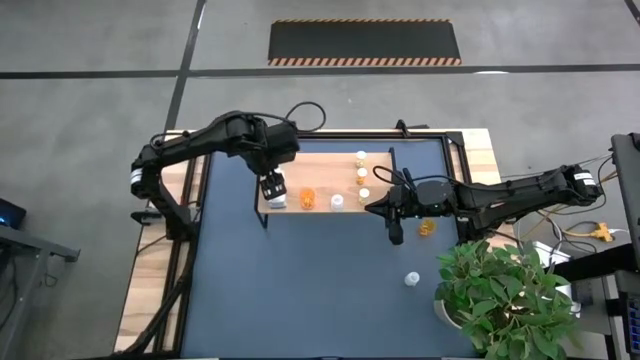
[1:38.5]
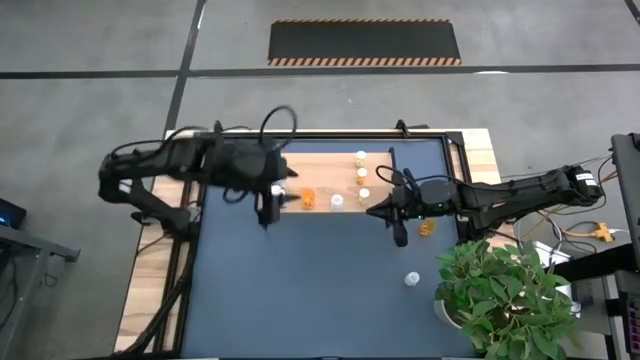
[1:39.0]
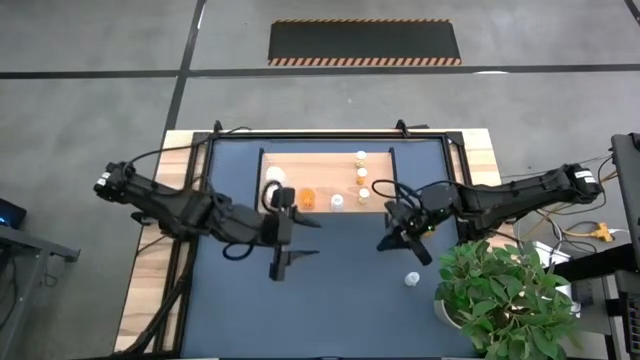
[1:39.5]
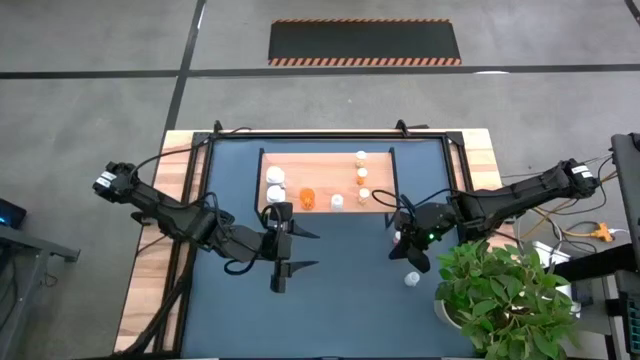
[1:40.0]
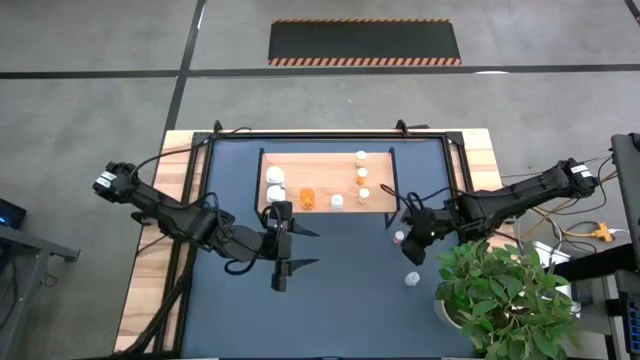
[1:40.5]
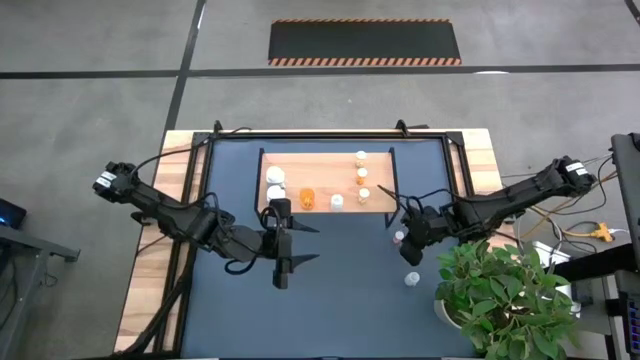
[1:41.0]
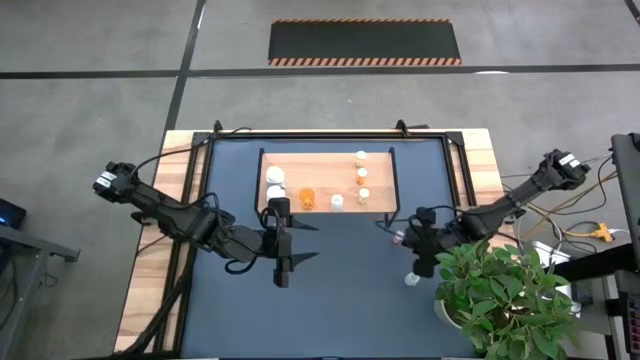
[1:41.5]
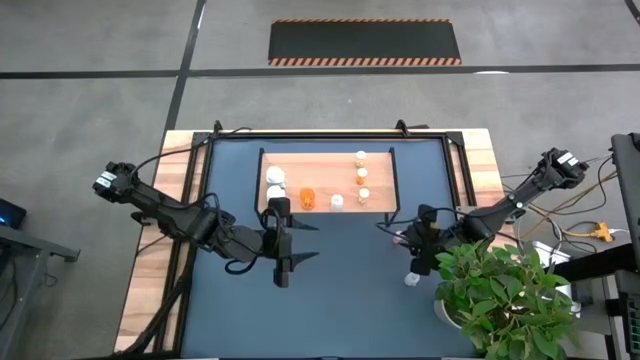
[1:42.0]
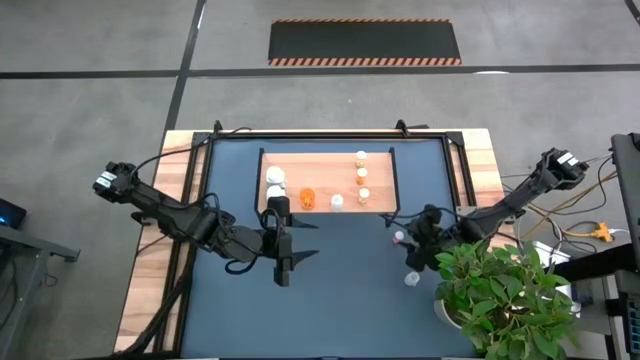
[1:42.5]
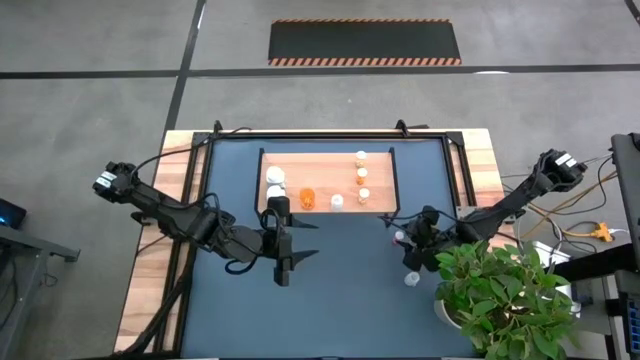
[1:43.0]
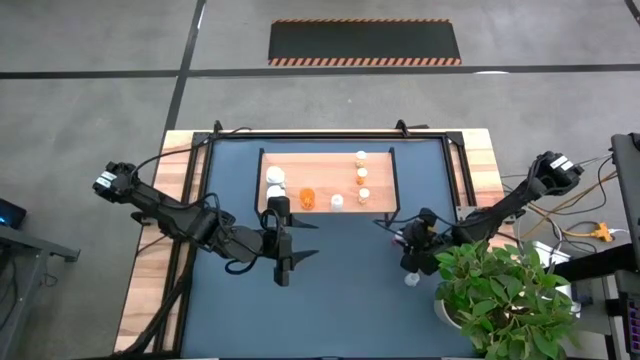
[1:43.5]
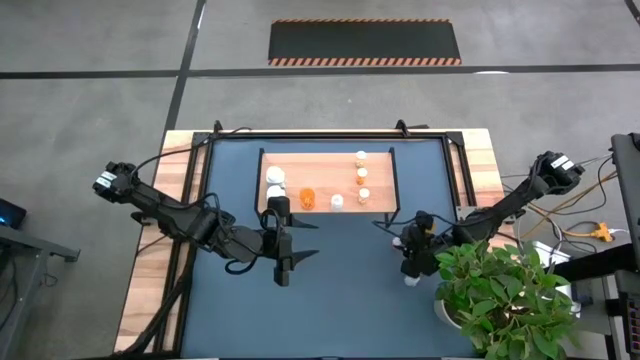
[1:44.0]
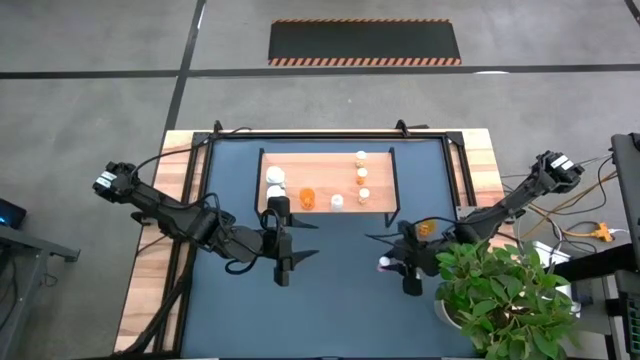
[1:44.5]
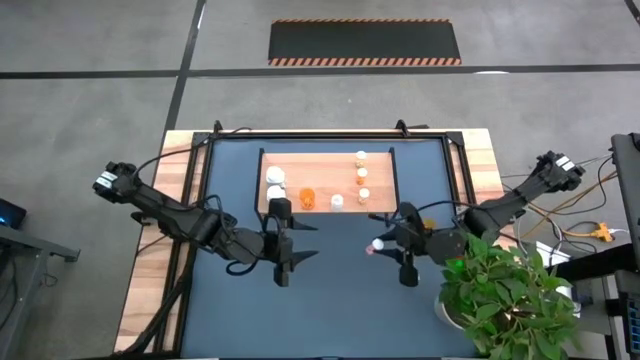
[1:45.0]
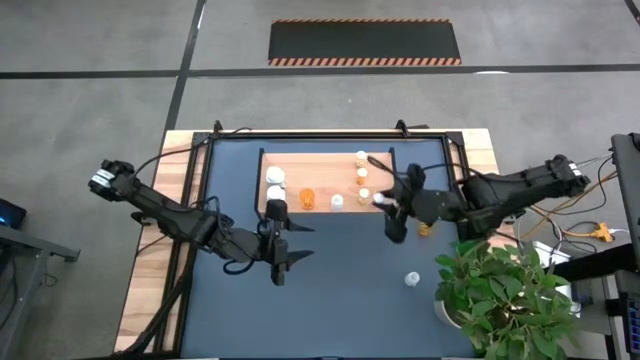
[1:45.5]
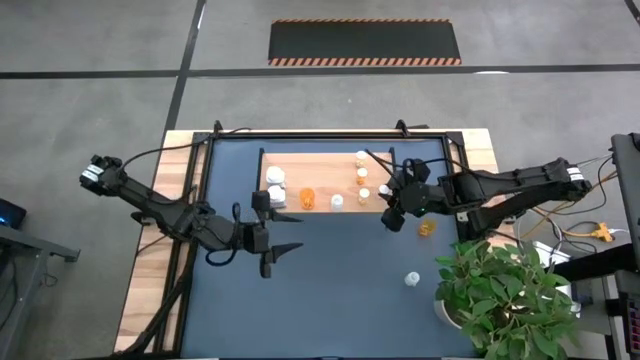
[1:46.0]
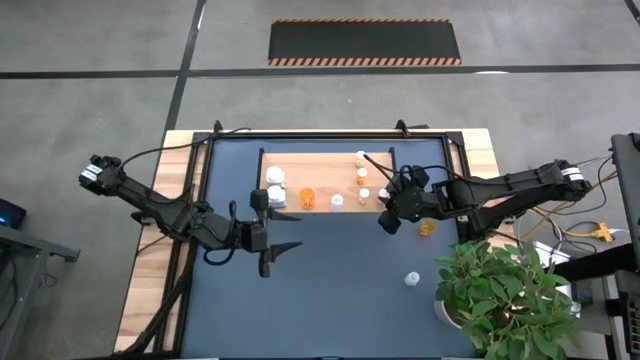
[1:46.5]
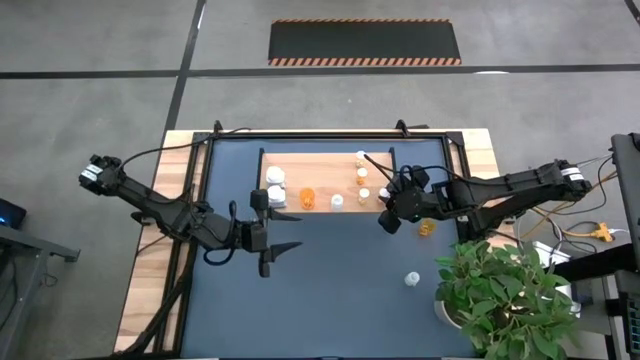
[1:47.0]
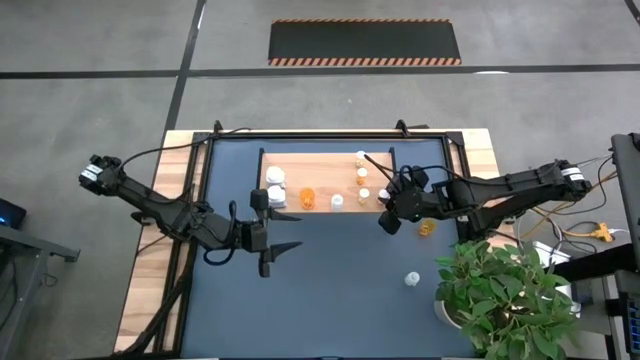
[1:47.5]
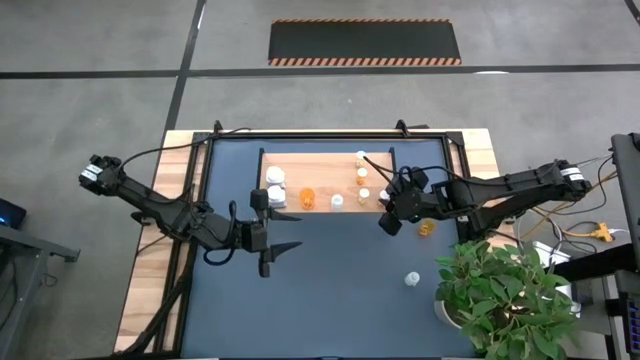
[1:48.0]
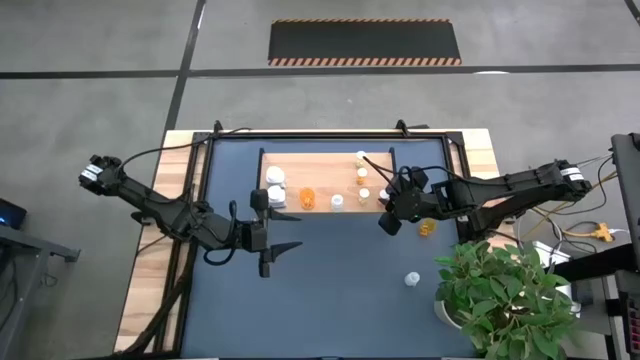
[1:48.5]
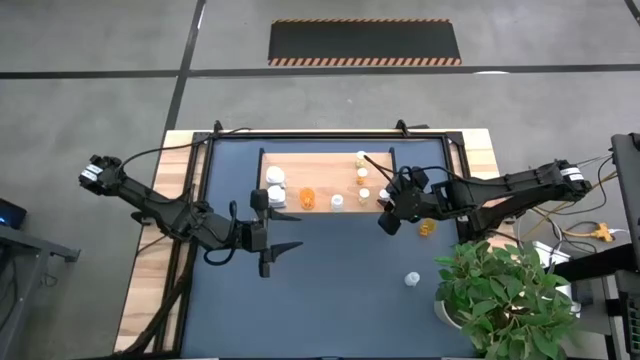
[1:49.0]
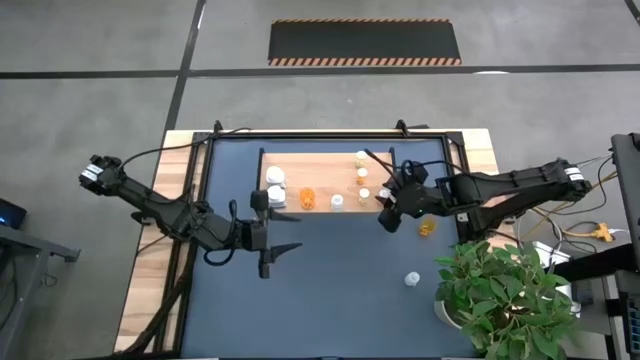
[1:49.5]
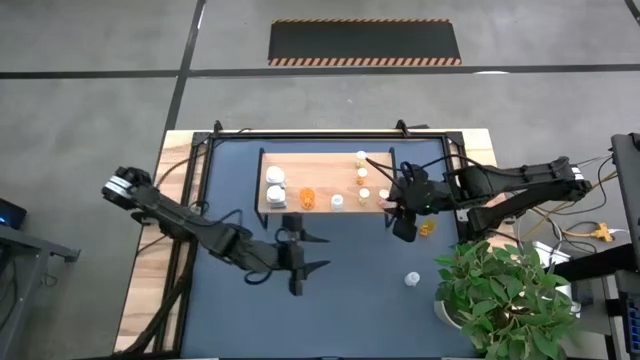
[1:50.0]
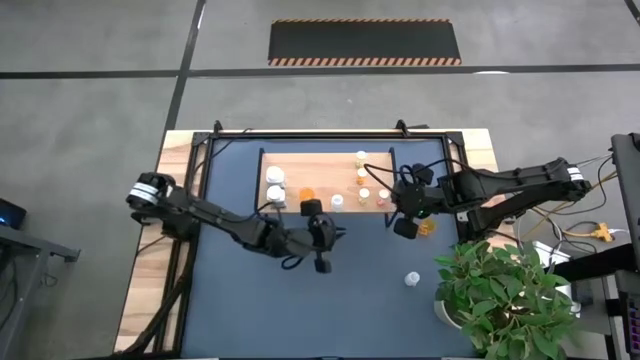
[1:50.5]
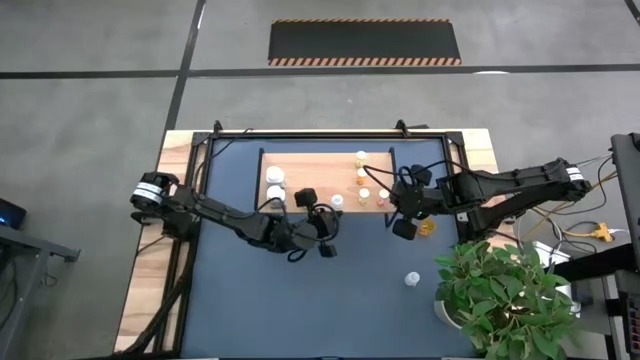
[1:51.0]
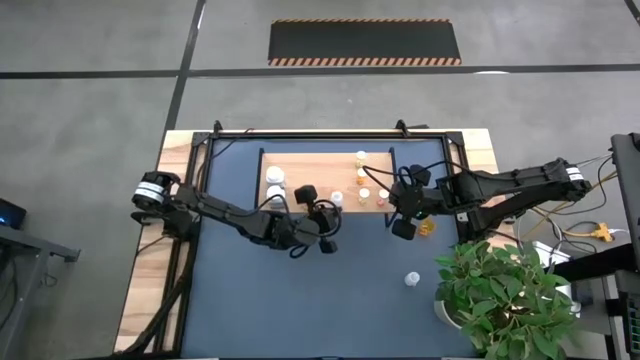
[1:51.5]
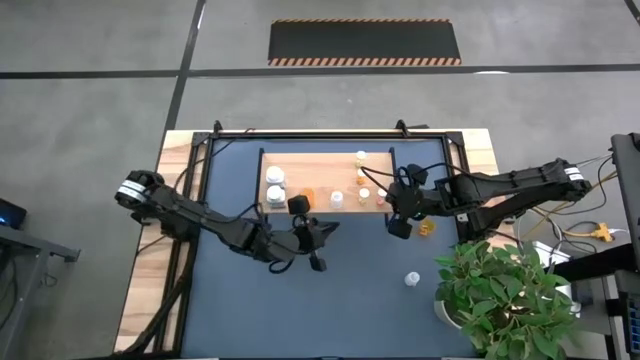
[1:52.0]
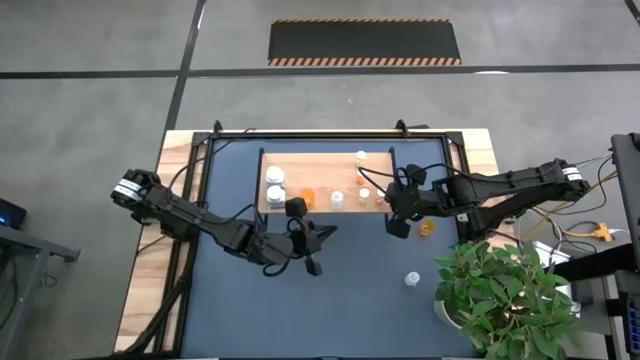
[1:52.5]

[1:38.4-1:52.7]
Task: Pick and place medicine bottles onto shelf by color
Put the pink bottle on the shelf

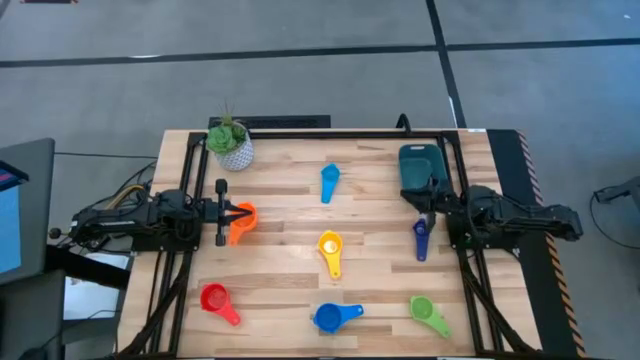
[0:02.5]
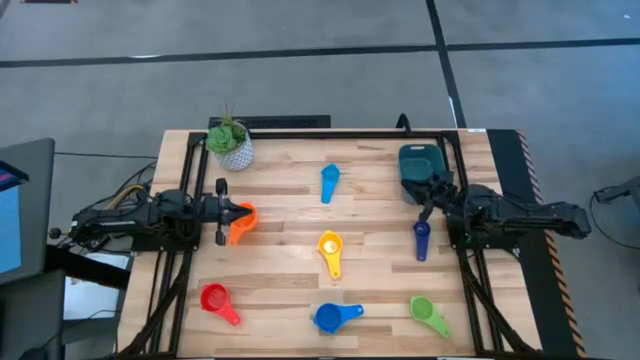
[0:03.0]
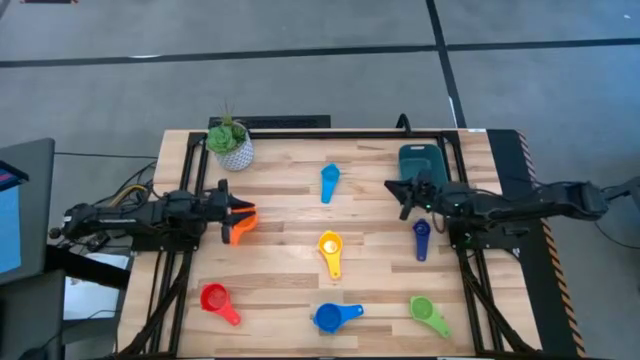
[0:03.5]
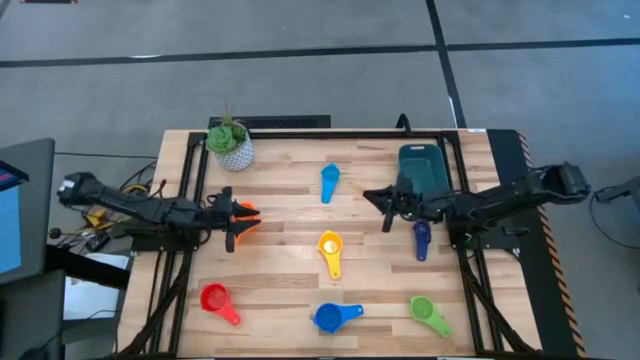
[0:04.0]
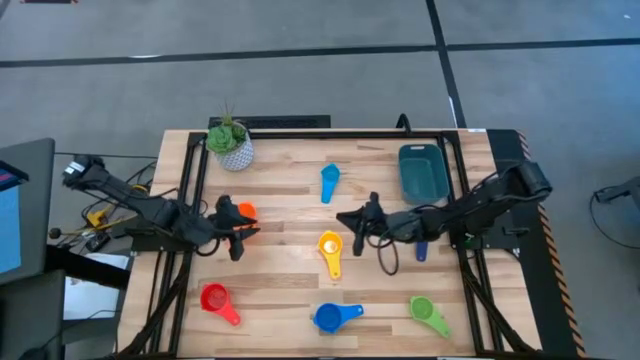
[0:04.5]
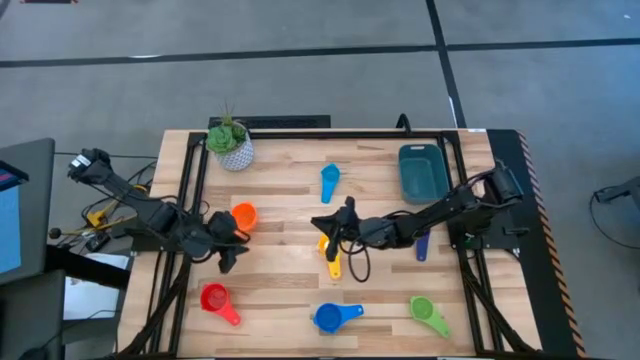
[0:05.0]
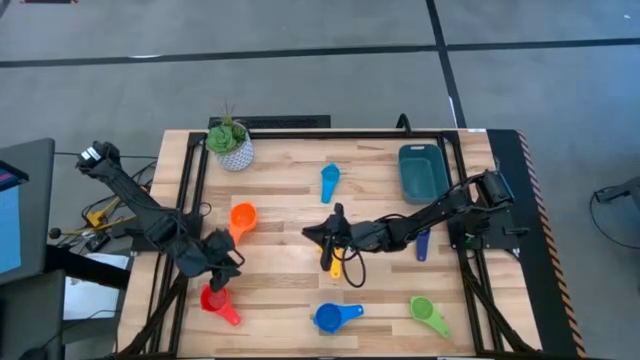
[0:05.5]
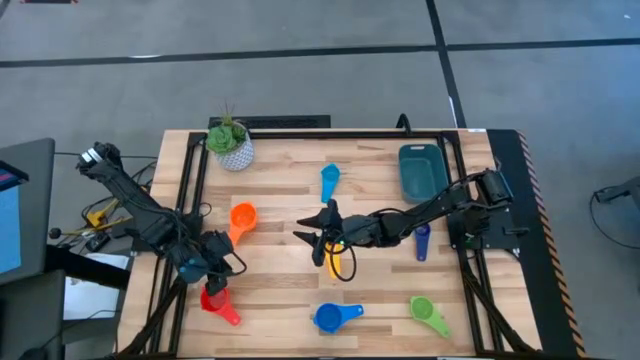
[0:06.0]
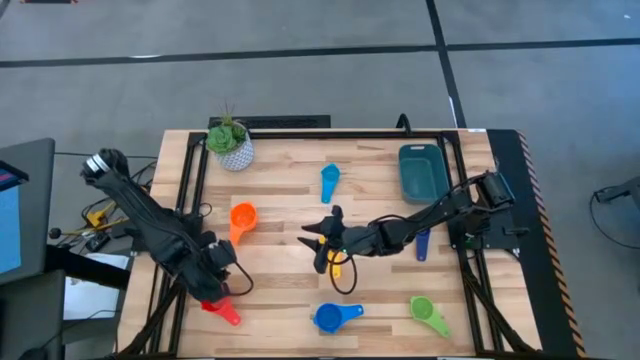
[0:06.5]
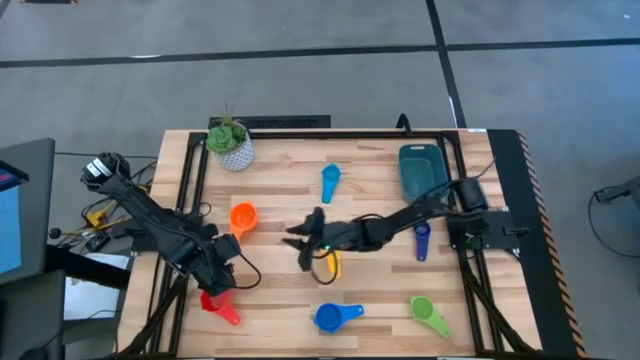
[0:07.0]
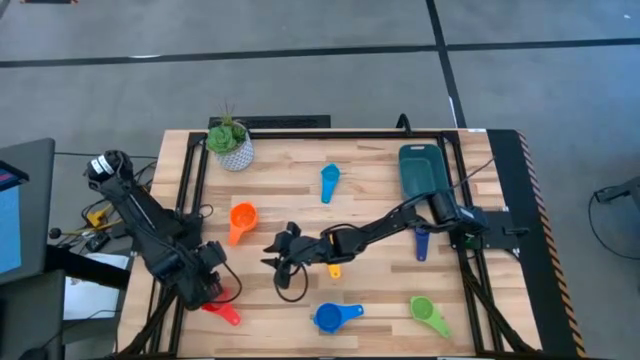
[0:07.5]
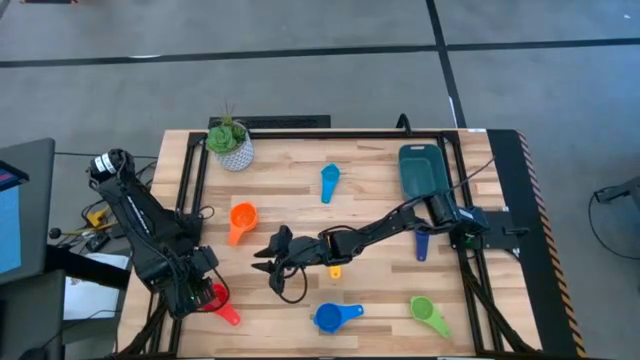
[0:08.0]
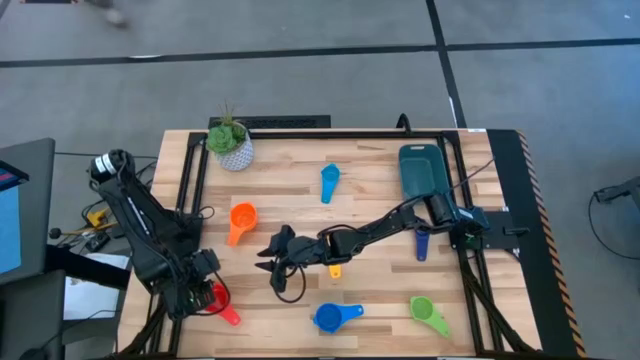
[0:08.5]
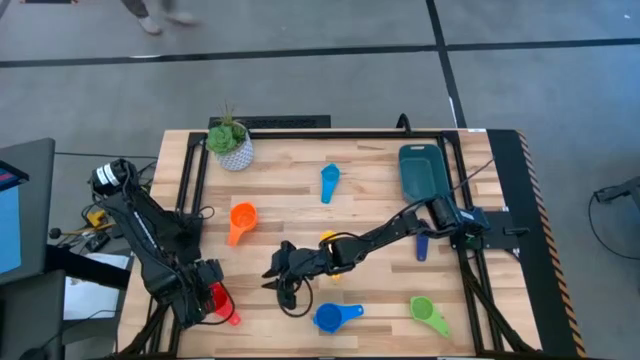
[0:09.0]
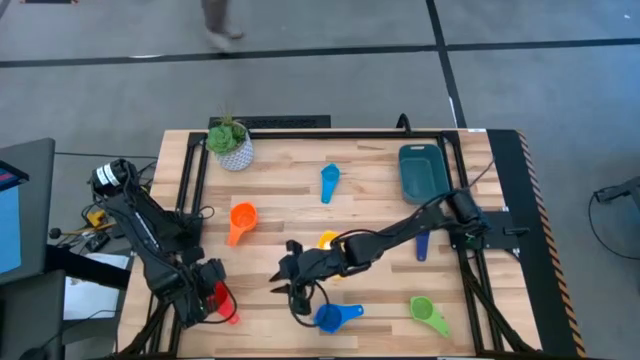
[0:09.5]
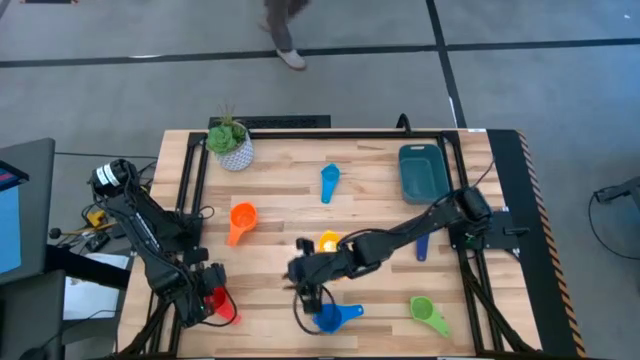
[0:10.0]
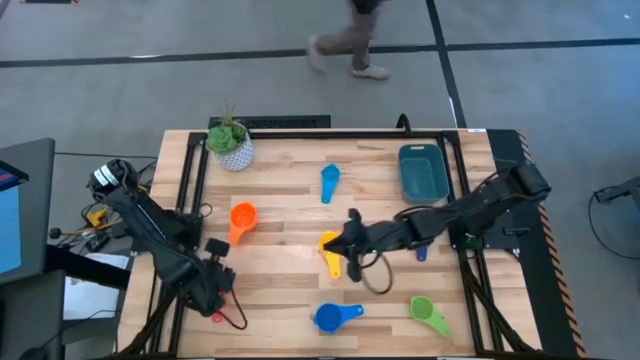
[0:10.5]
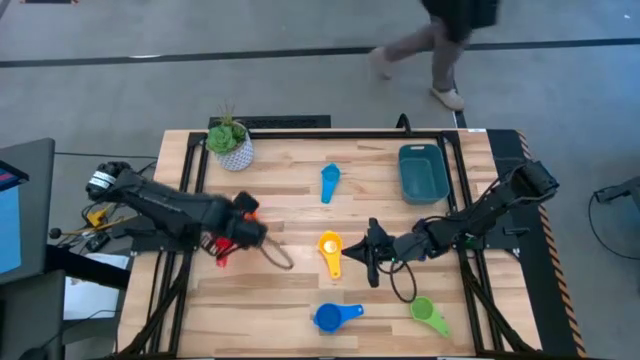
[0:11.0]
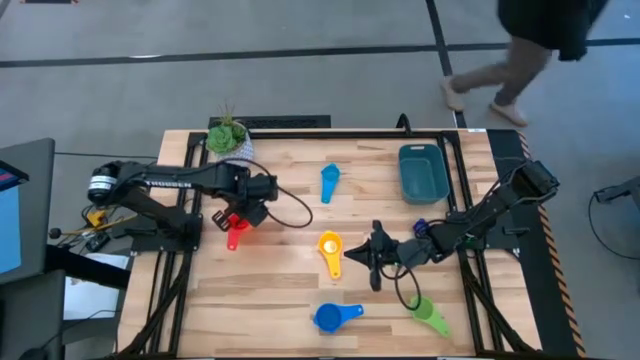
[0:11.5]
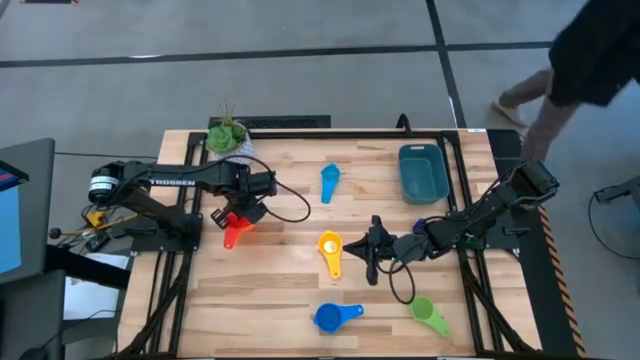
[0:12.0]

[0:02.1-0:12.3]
Task: Nest measuring cups in basket
Stack the red measuring cup into the orange measuring cup
